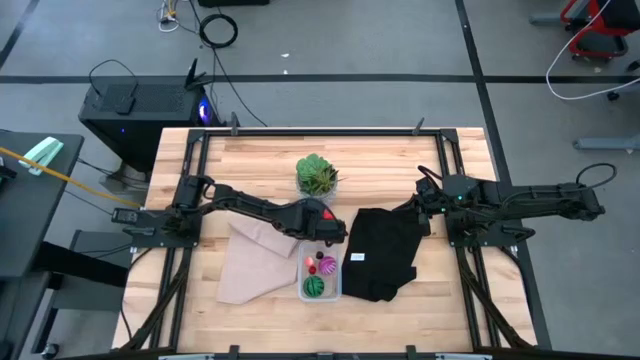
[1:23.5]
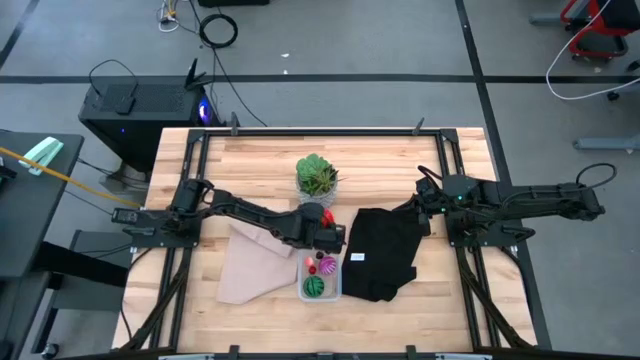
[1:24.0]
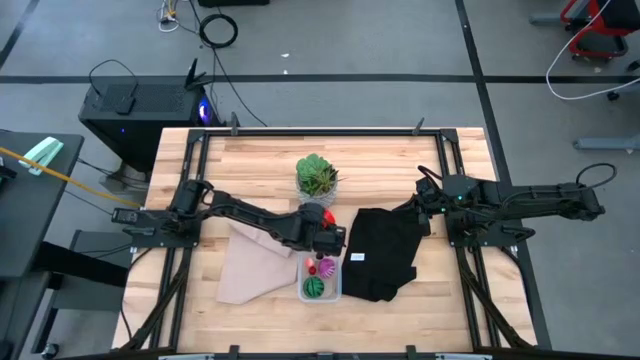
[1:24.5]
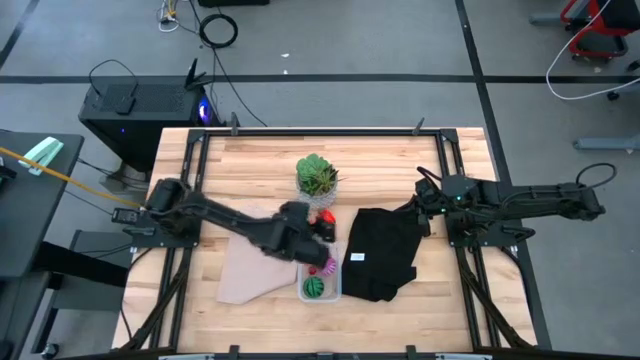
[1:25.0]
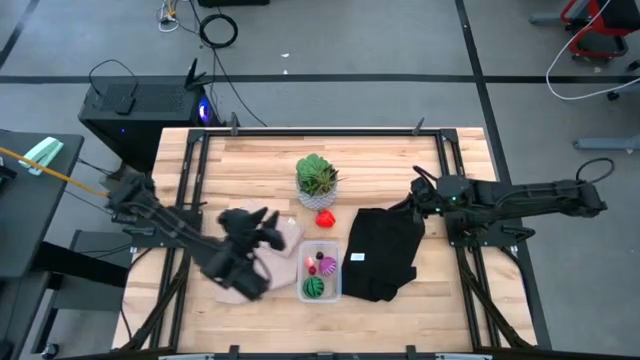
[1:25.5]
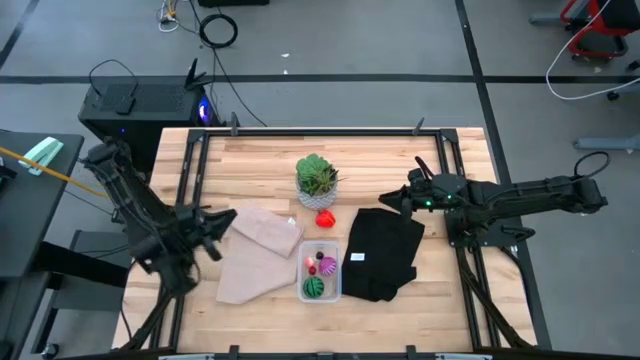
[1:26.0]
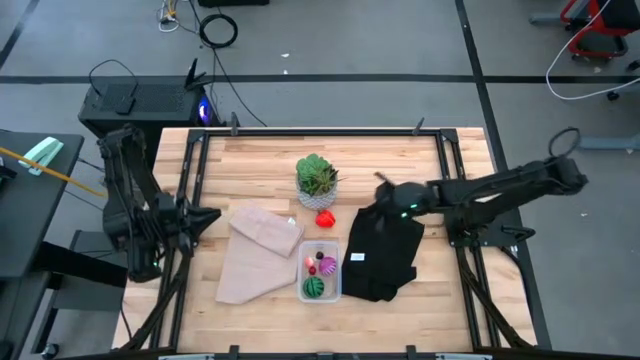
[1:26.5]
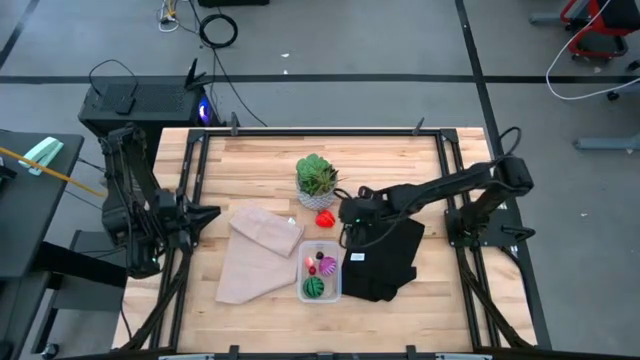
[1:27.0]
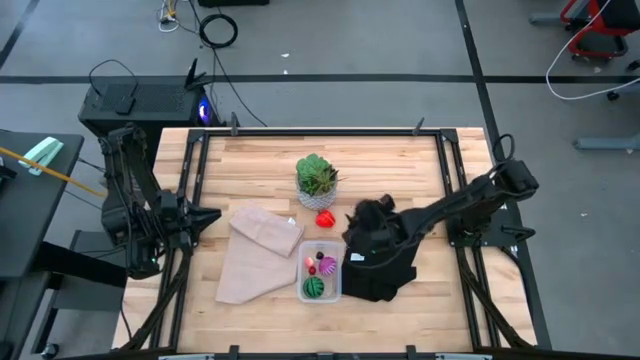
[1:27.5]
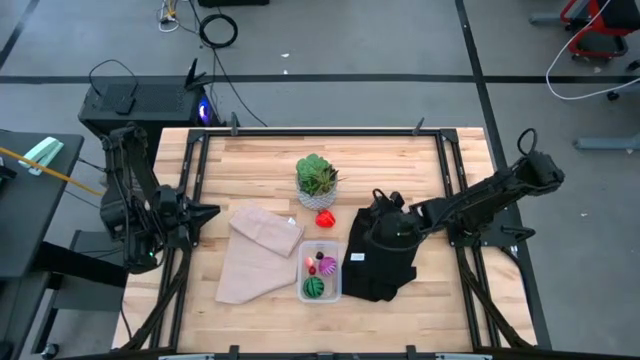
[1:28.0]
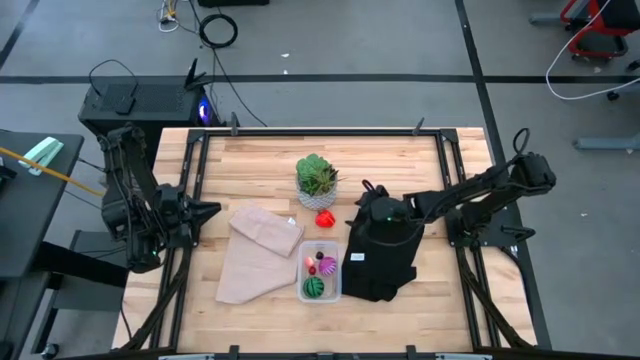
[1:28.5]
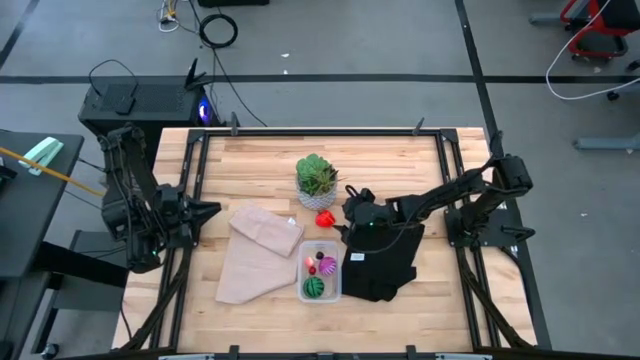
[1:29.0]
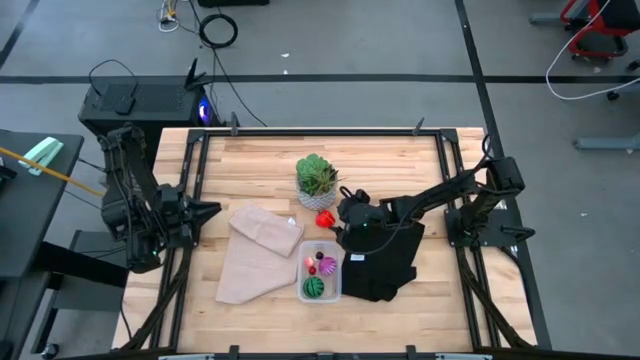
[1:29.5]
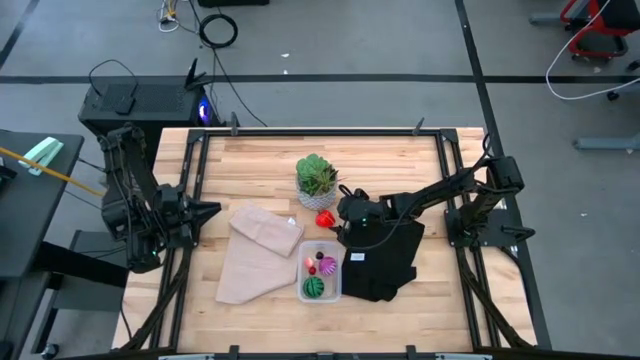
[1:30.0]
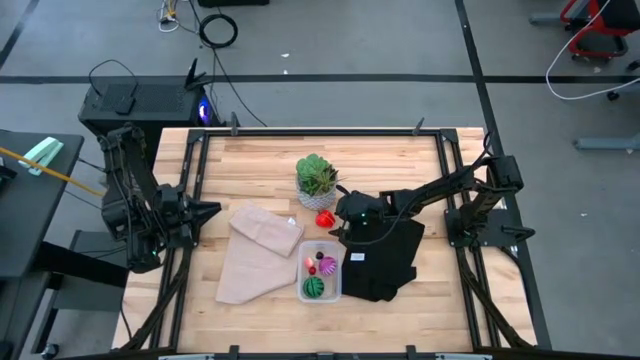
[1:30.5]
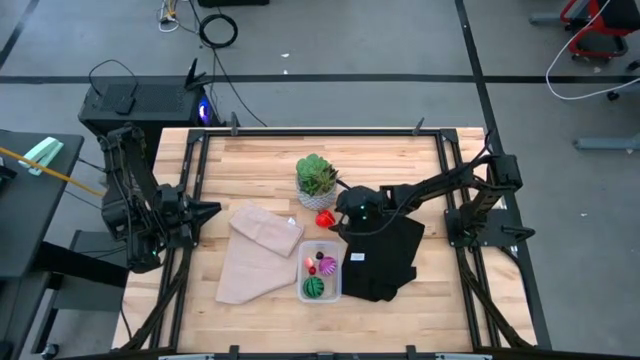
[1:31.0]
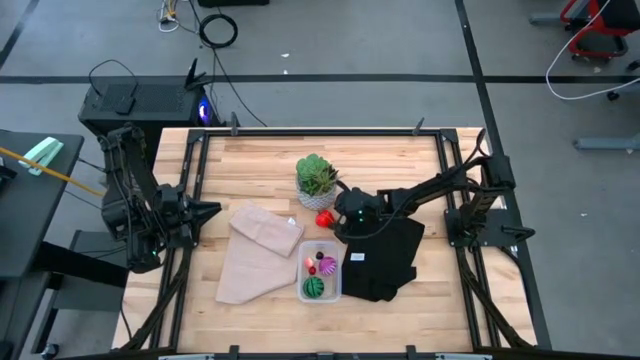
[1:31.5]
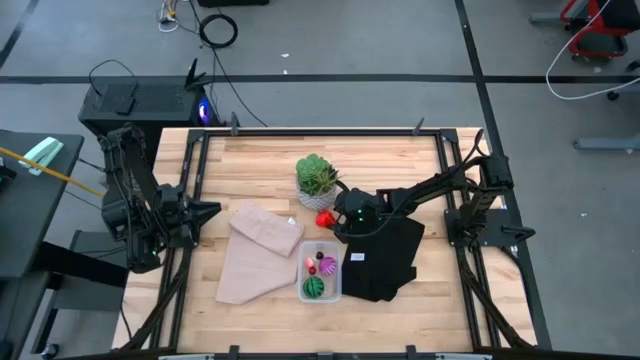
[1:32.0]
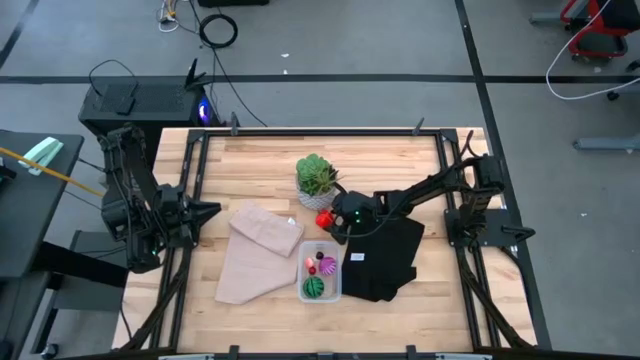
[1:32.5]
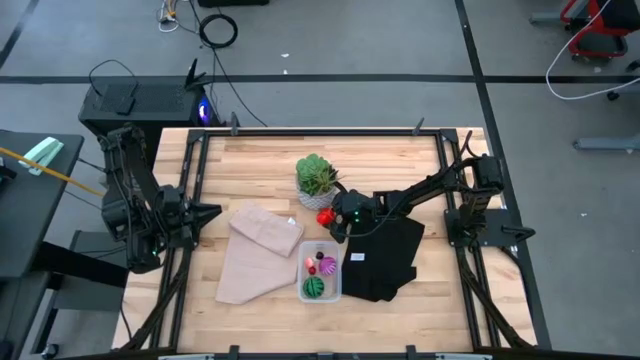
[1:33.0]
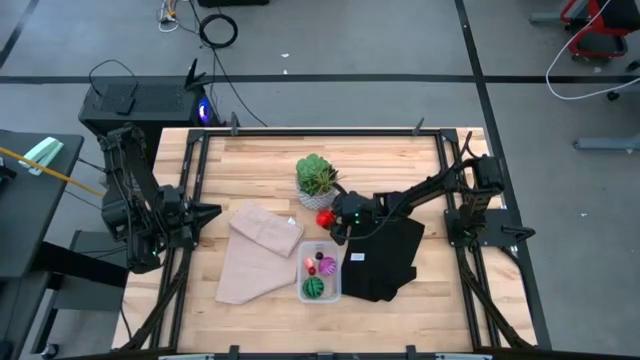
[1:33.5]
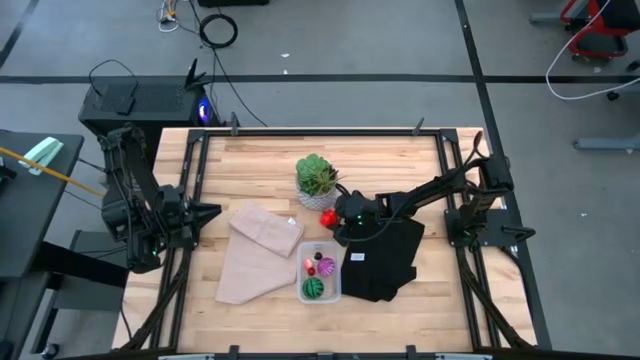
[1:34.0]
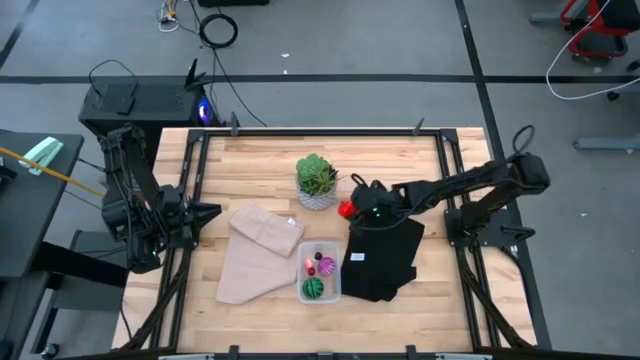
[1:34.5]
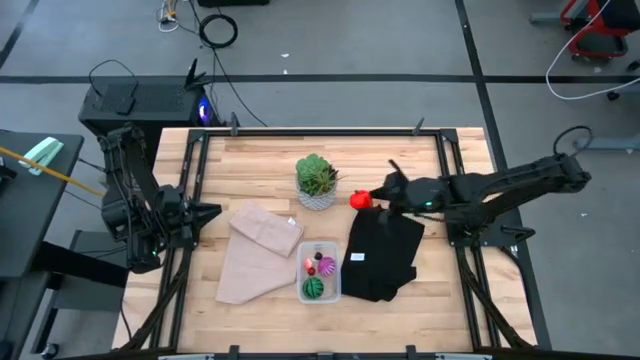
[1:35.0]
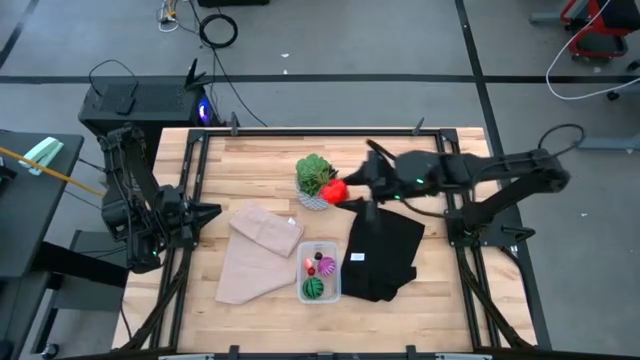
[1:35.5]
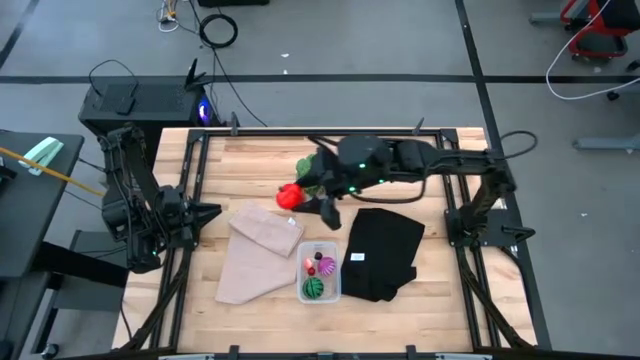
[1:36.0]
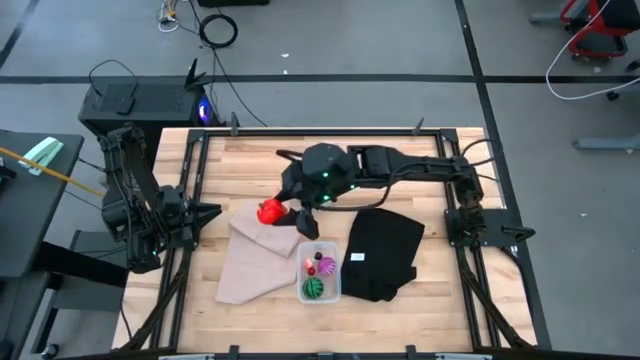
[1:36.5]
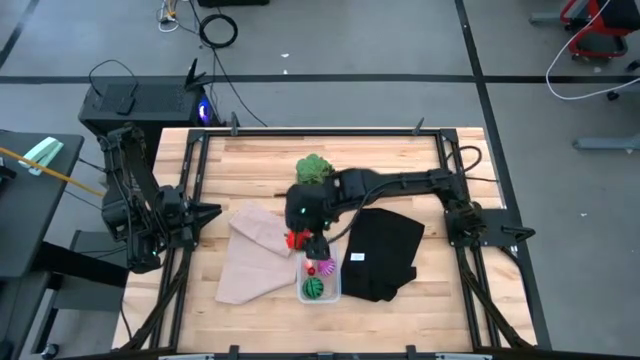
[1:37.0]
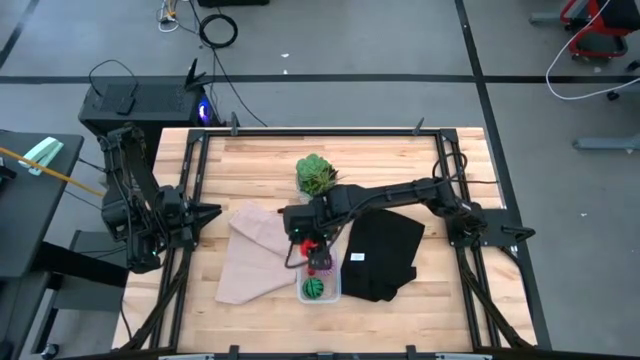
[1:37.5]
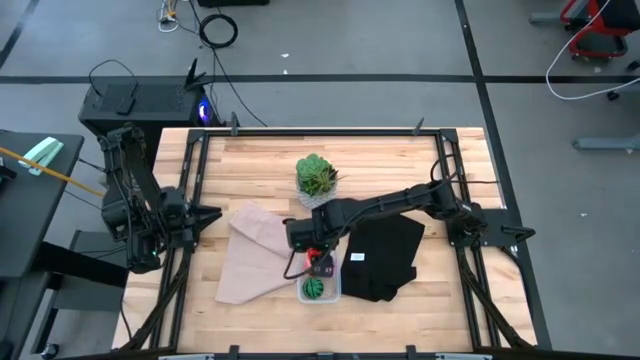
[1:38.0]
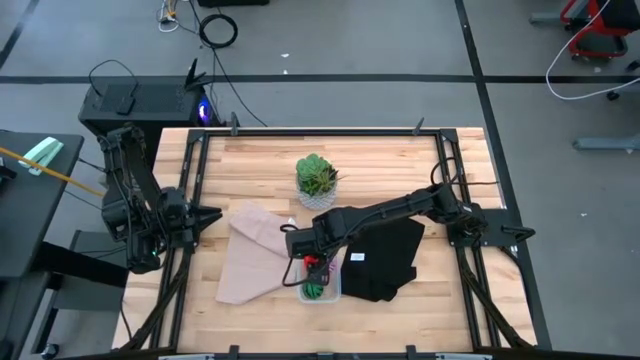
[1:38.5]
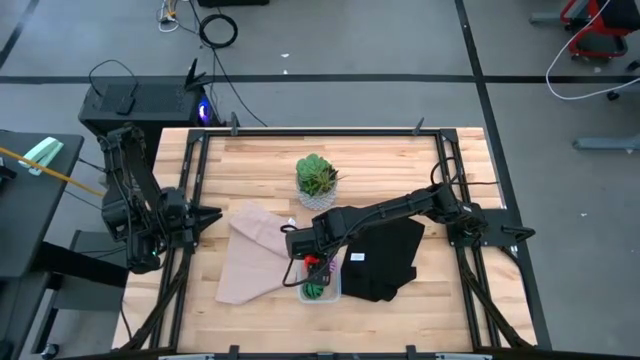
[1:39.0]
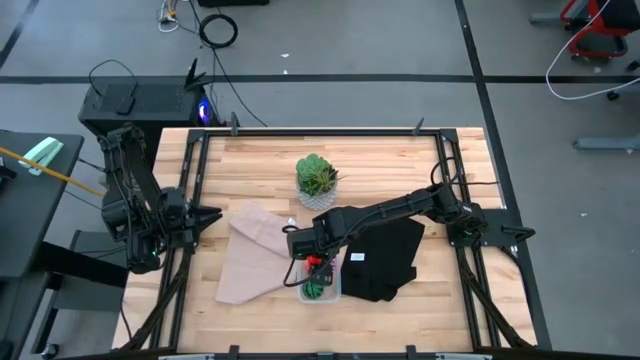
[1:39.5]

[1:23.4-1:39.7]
Task: Pick and placing Produce into tupperware
Put the red apple into the transparent container

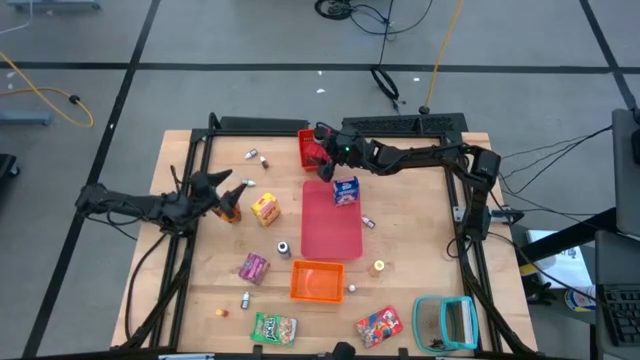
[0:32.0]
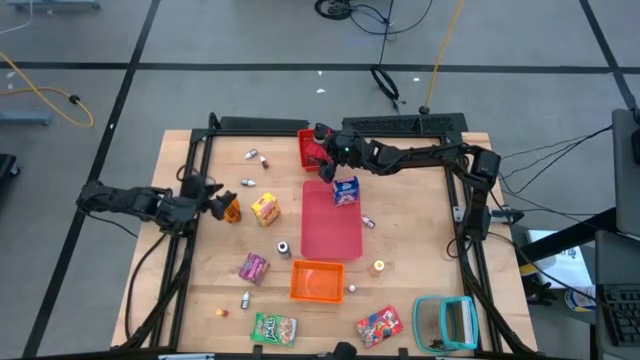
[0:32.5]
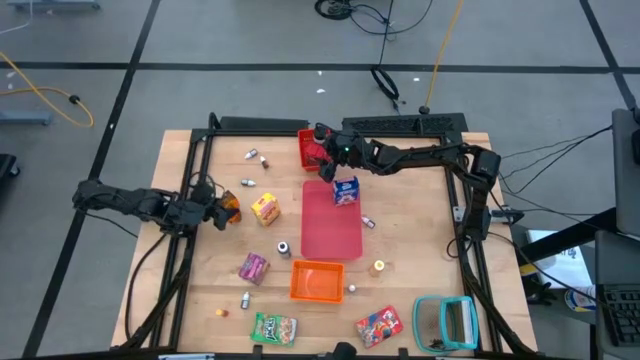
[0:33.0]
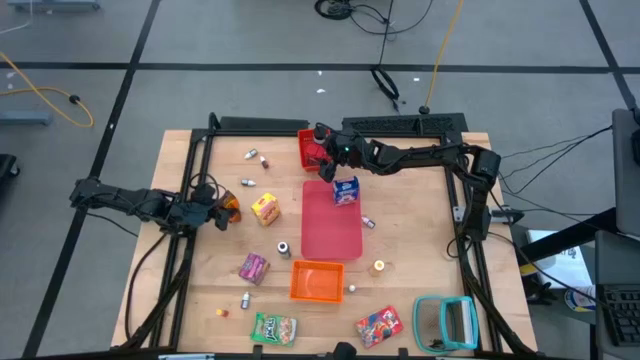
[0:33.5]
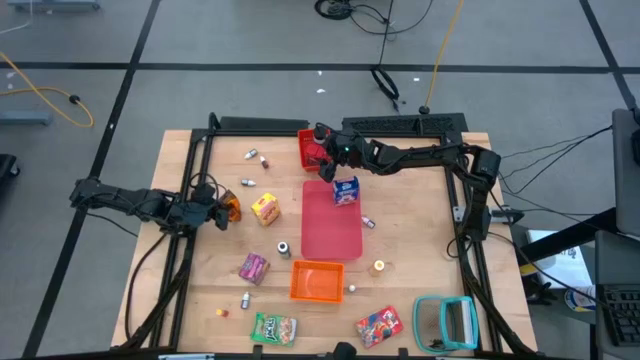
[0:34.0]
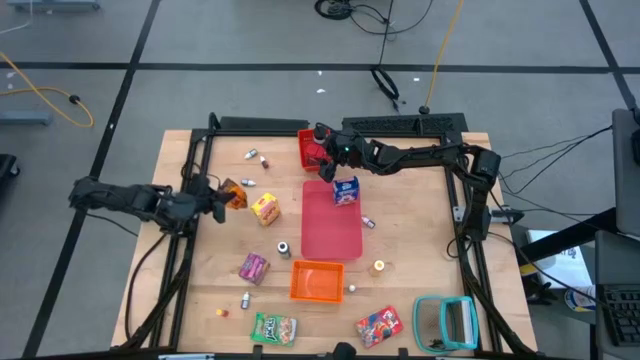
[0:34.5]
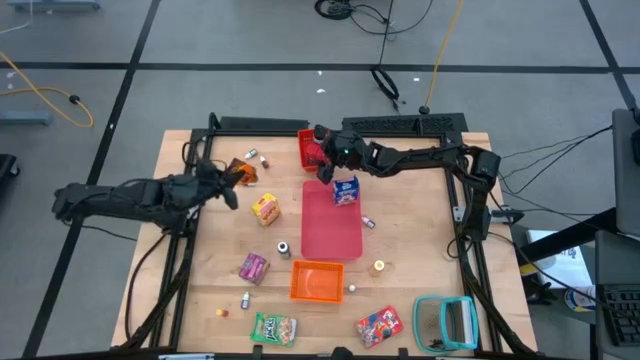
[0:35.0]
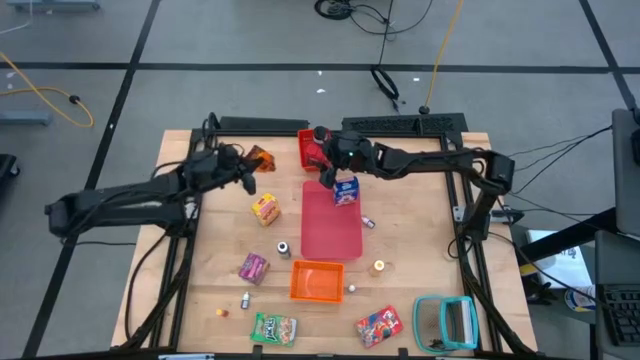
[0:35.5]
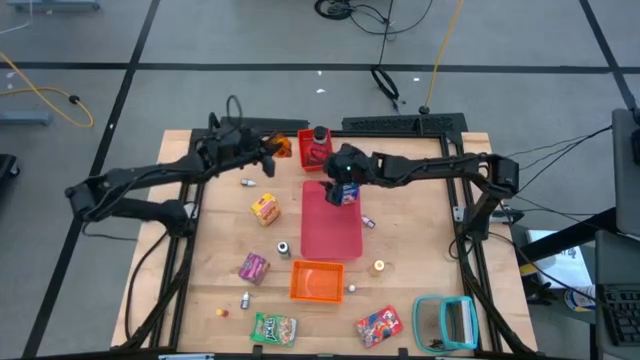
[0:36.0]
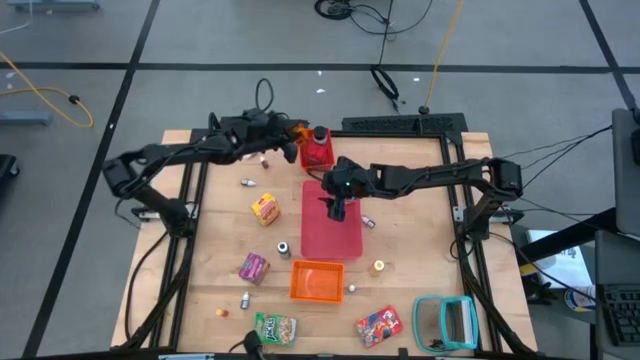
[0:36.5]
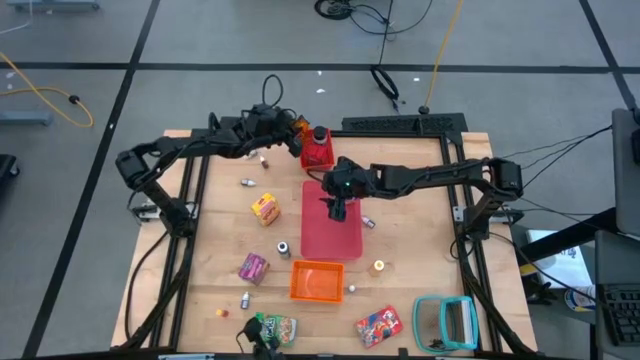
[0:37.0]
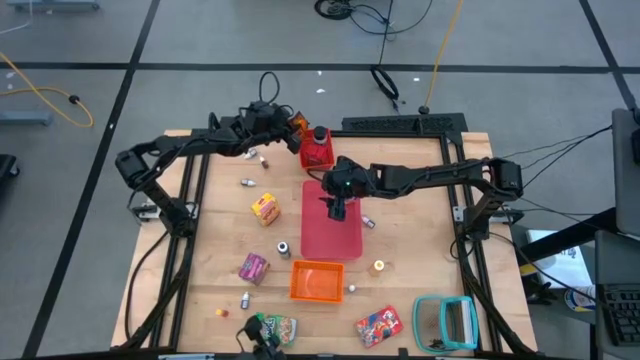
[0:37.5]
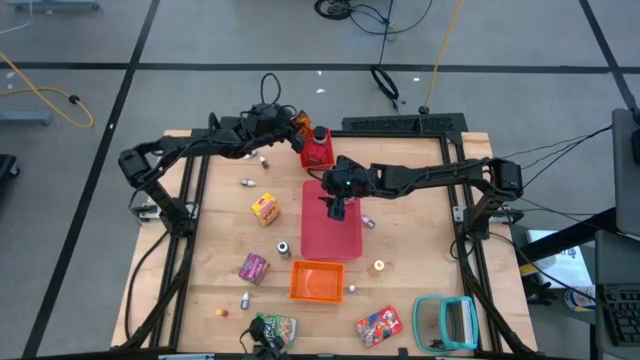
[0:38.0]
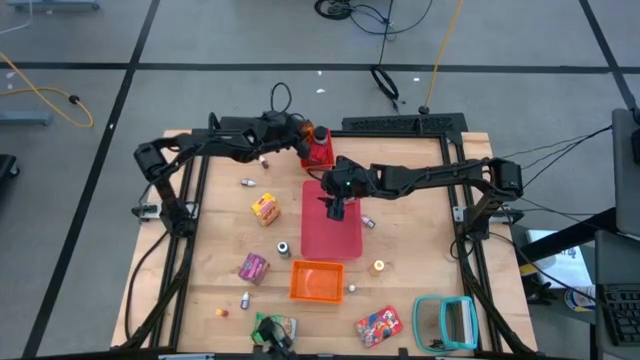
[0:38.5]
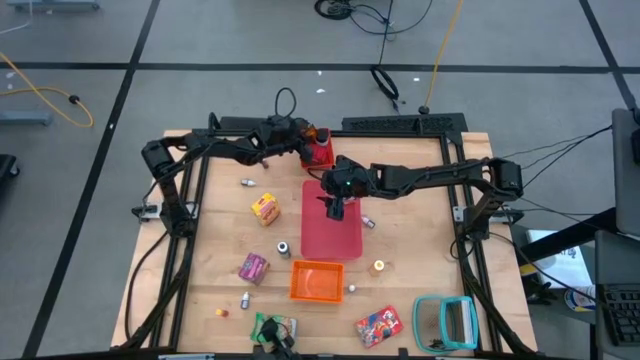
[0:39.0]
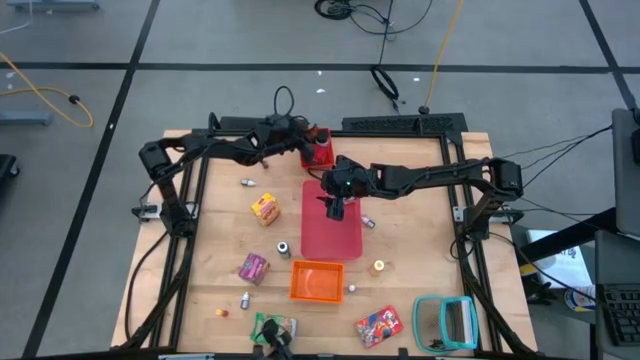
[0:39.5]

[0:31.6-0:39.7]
Task: Pick & Place Kitchen Items
Put the orange seasoning pack into the red bin
